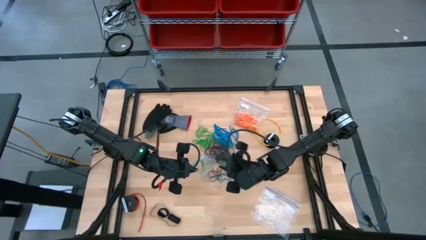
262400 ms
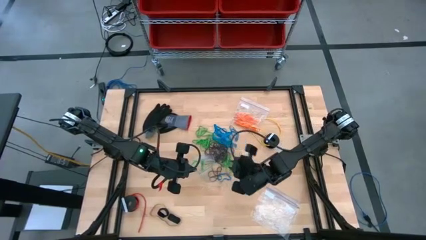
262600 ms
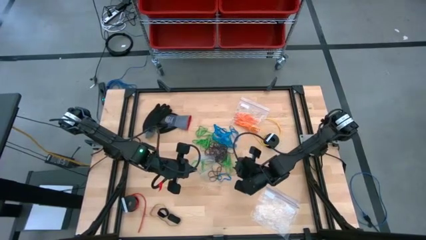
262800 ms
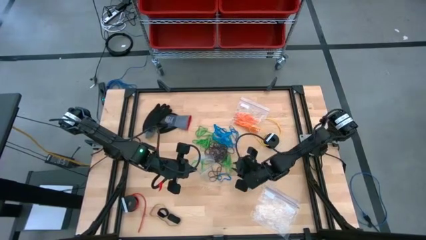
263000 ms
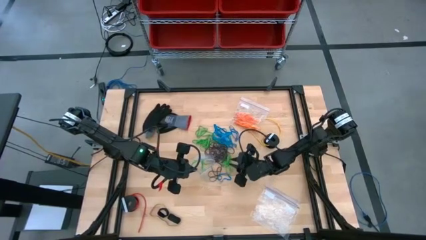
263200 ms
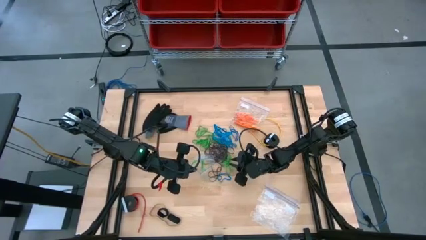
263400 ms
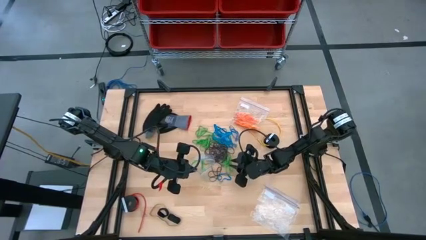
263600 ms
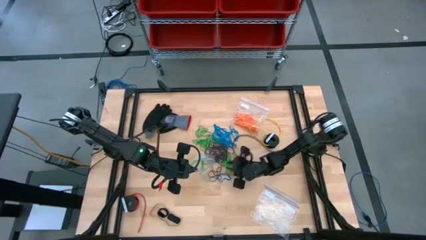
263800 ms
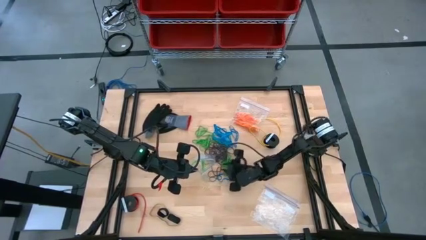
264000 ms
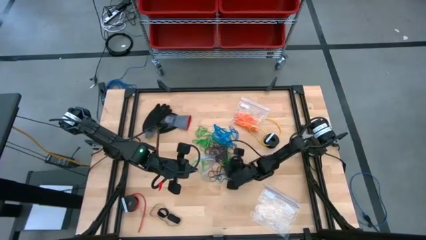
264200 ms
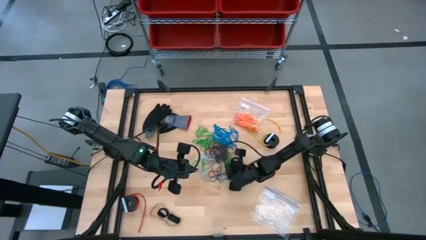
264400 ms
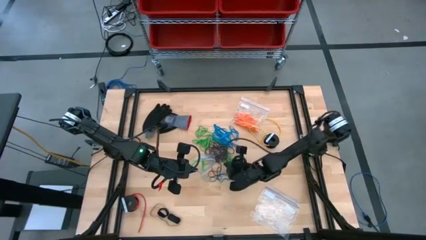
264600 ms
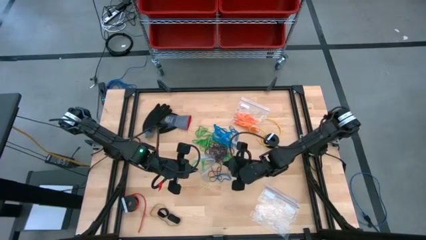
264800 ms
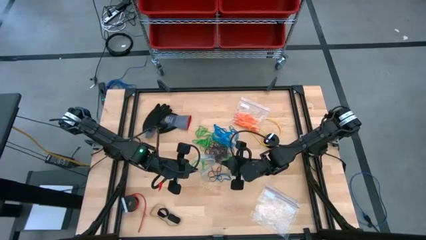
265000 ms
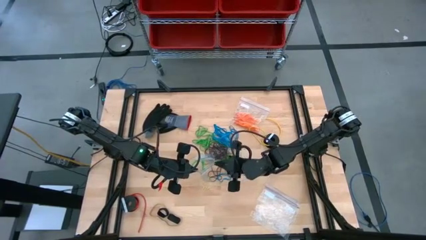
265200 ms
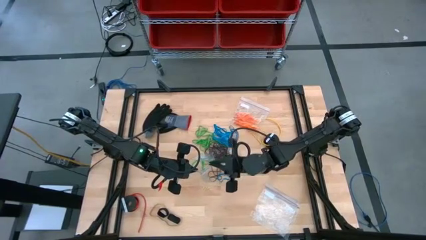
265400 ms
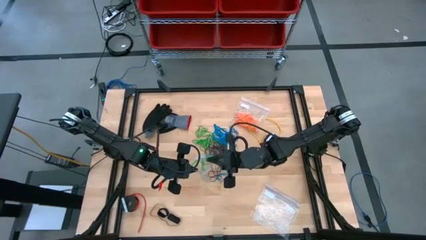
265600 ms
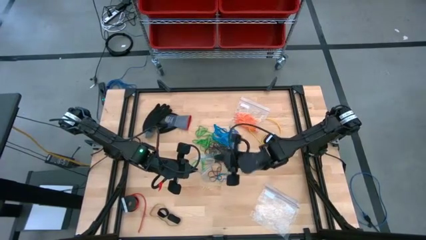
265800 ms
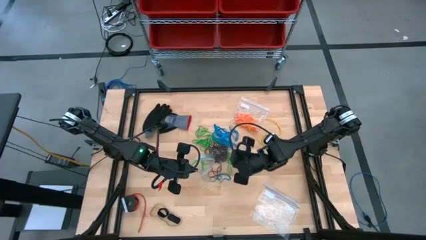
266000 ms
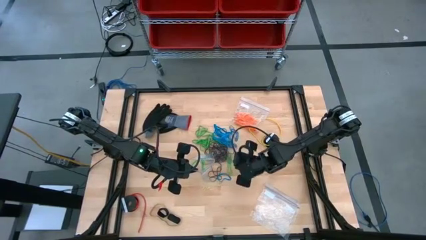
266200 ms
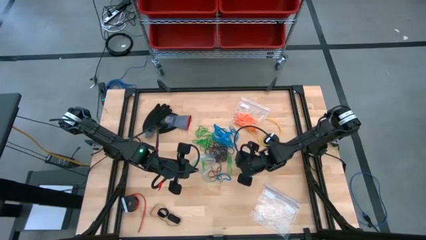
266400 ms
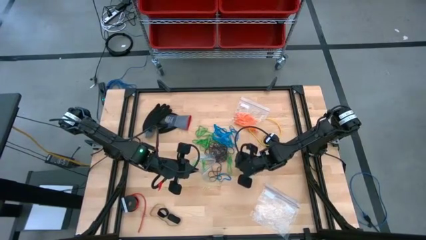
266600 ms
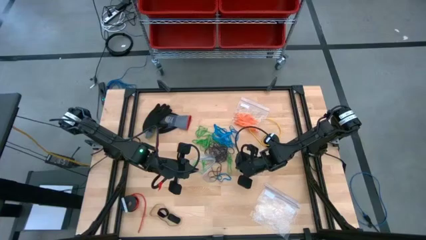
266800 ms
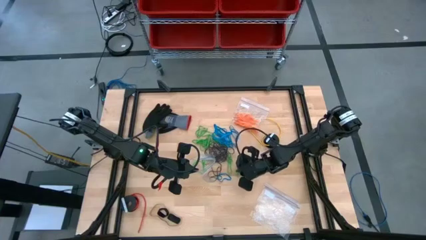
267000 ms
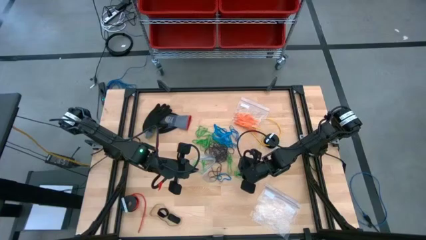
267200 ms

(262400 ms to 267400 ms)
Task: Sort rubber bands
Put the green rubber band into the transparent zip bag

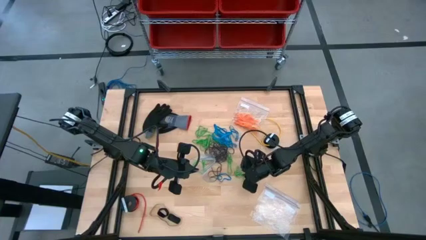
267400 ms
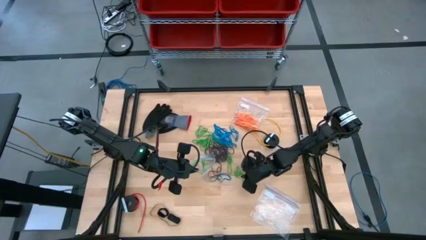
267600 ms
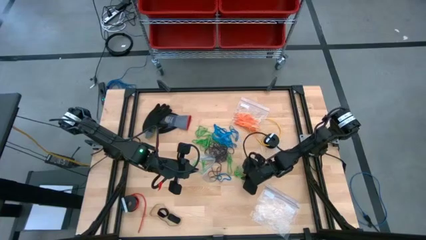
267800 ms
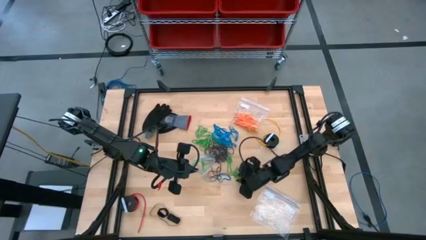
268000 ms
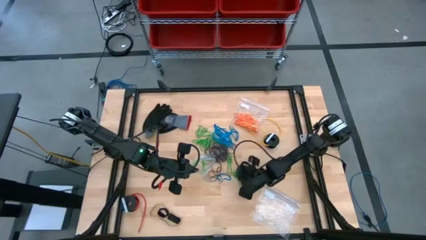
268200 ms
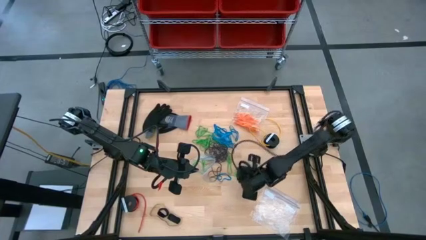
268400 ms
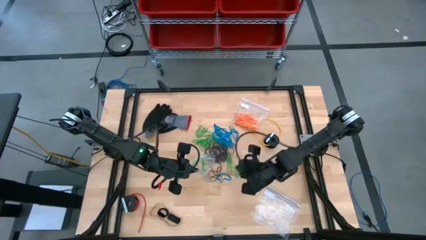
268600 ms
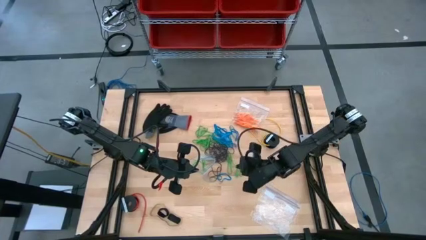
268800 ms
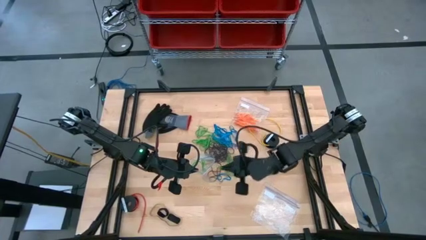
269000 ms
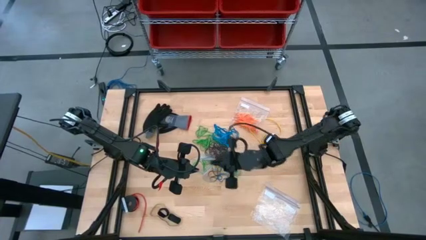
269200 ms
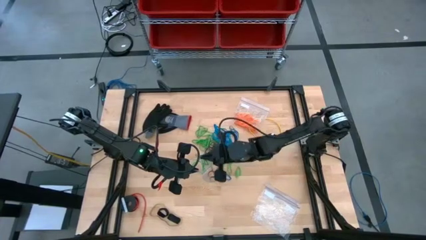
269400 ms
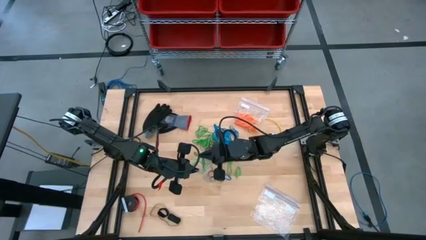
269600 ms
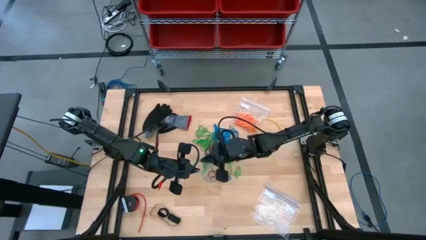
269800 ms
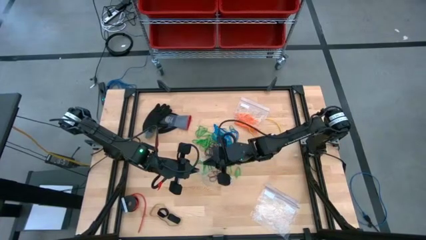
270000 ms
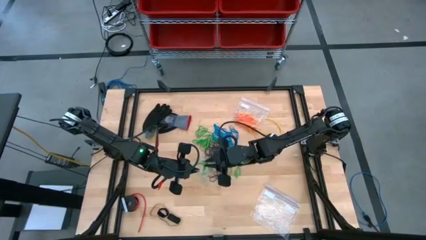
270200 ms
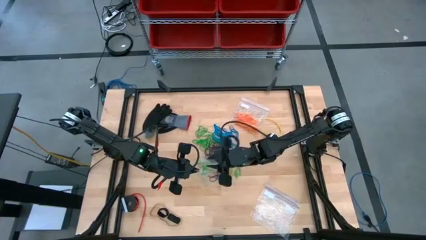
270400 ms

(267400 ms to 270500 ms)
Put the green rubber band into the transparent zip bag

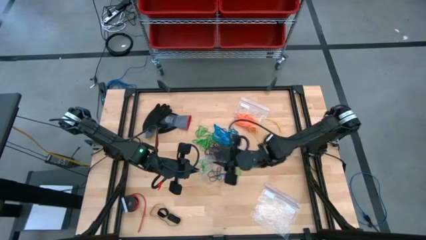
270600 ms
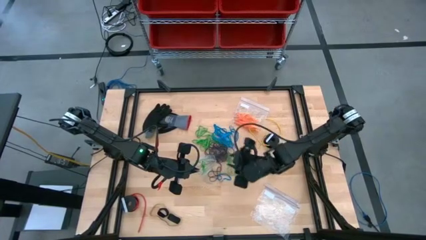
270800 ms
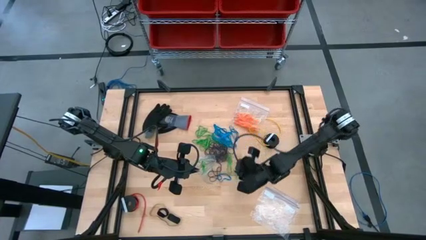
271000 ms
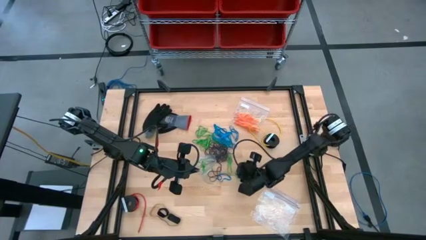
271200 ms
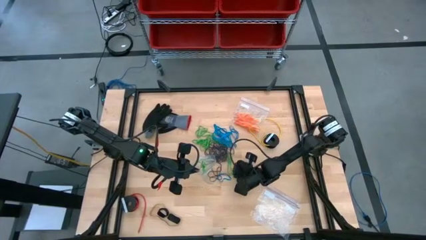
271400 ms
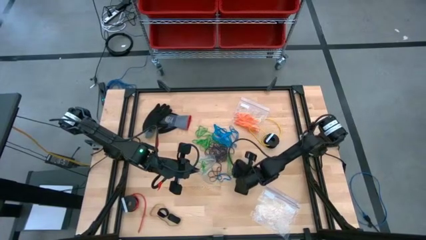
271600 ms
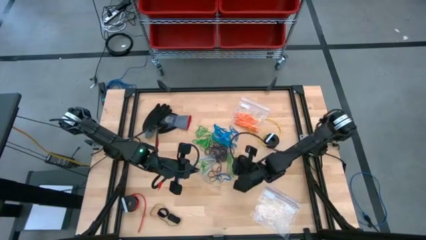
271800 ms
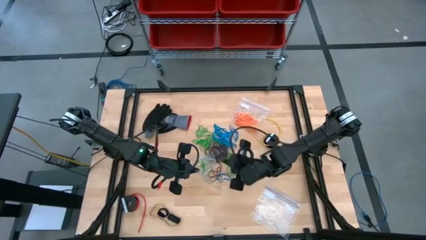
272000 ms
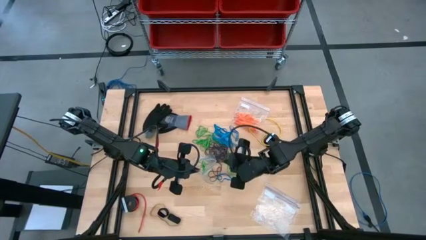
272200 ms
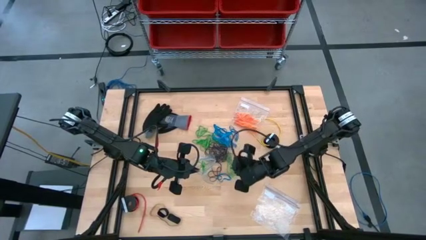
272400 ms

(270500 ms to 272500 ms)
Put the green rubber band into the transparent zip bag

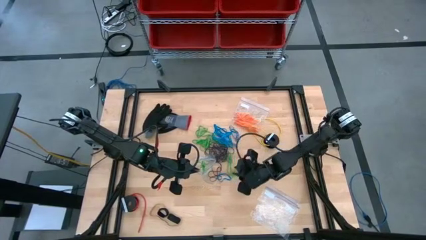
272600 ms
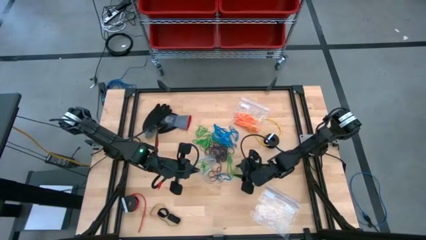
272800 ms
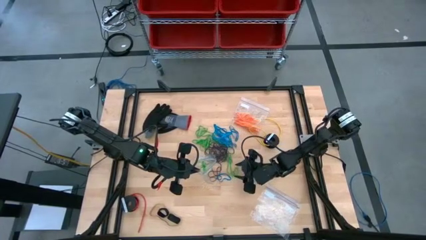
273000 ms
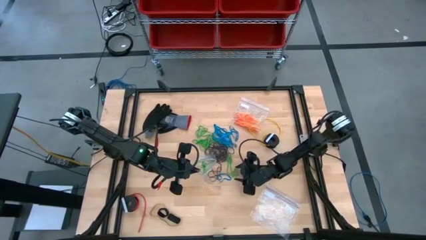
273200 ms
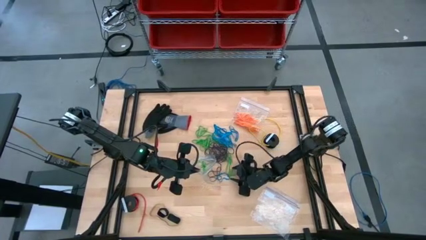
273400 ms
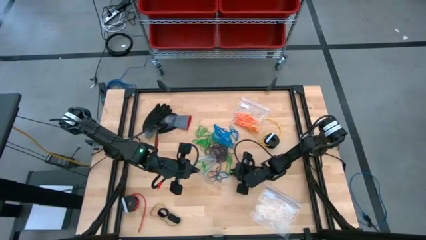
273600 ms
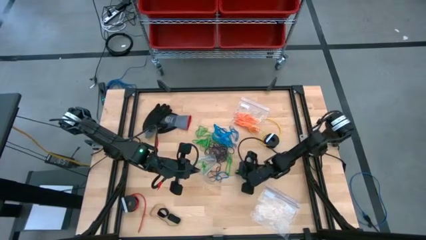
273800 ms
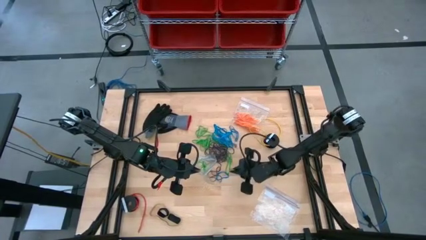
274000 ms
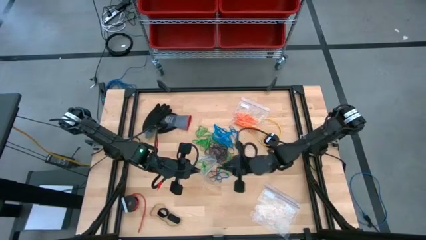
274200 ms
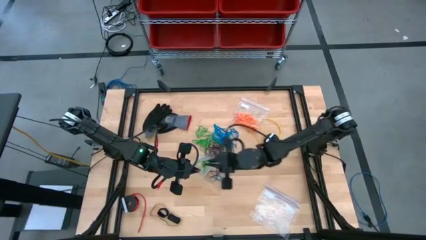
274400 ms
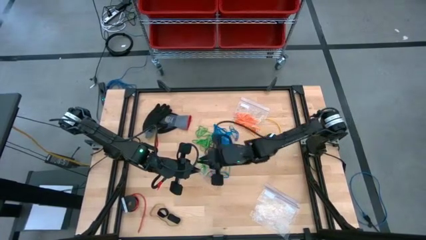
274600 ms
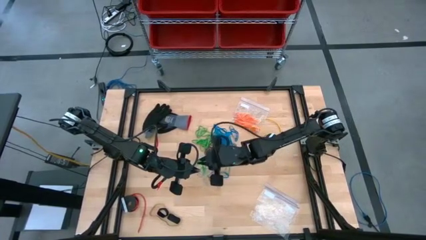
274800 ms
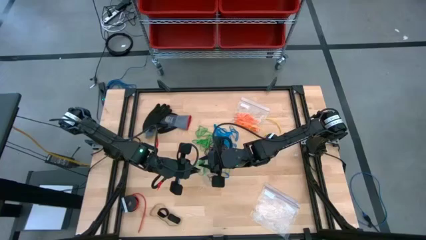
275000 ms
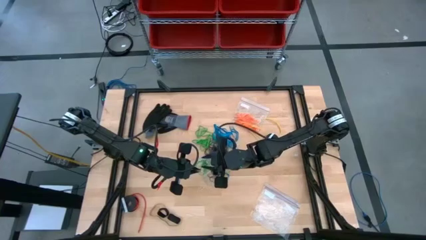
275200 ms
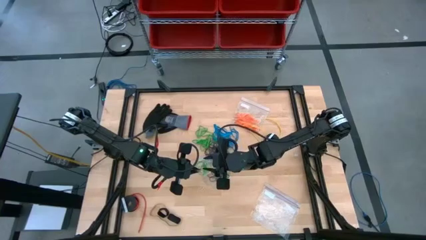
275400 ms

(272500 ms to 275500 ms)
Put the green rubber band into the transparent zip bag

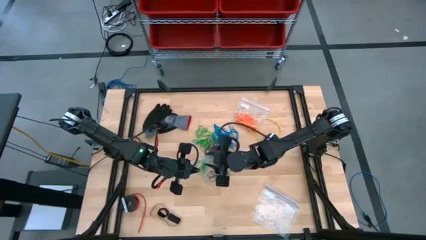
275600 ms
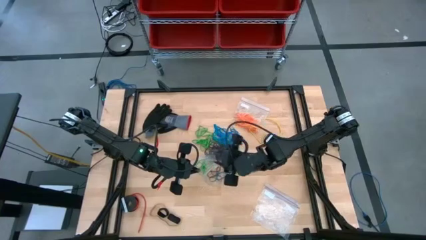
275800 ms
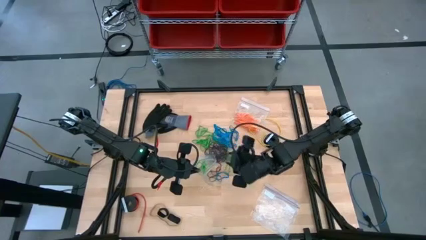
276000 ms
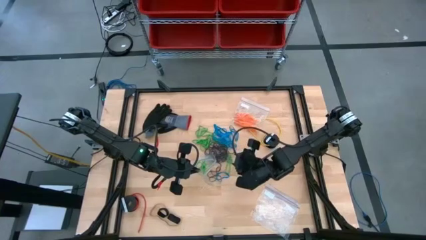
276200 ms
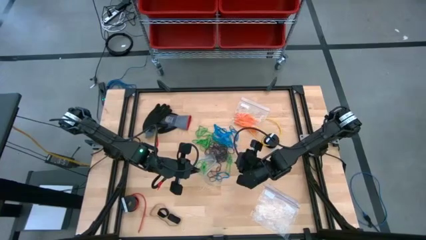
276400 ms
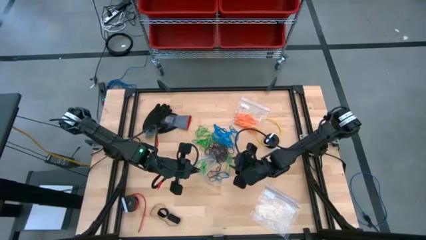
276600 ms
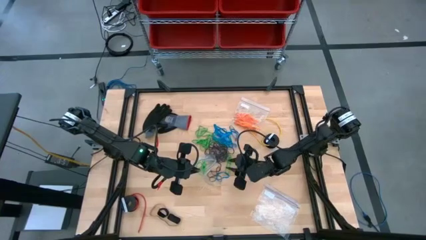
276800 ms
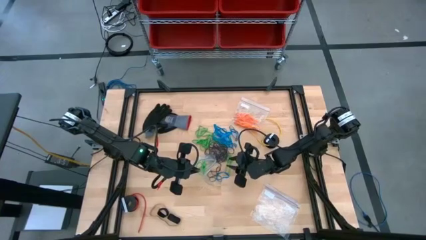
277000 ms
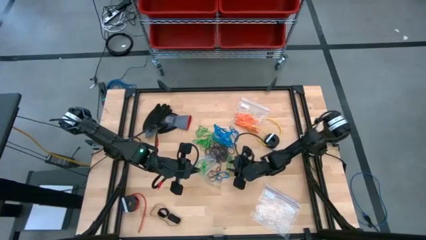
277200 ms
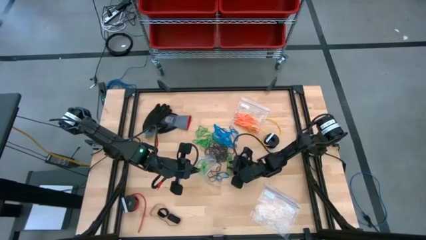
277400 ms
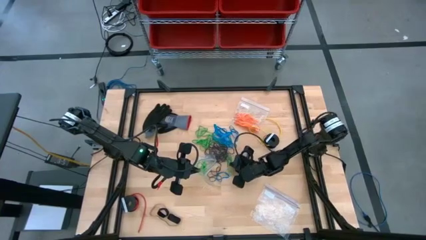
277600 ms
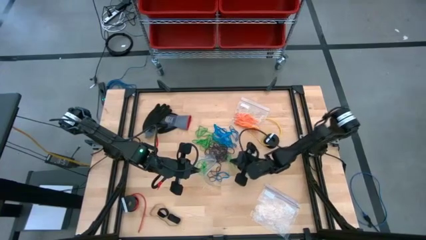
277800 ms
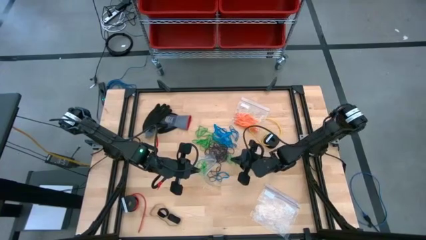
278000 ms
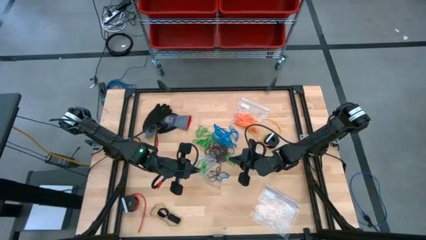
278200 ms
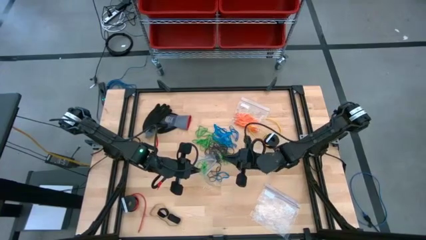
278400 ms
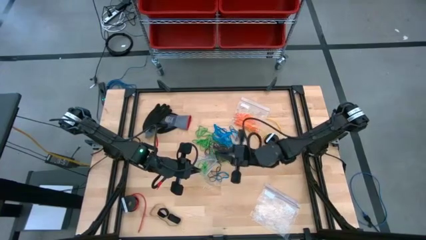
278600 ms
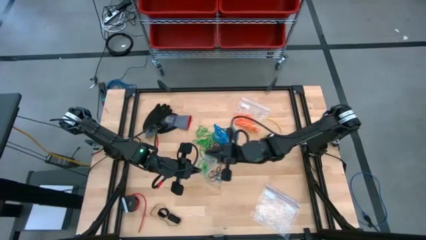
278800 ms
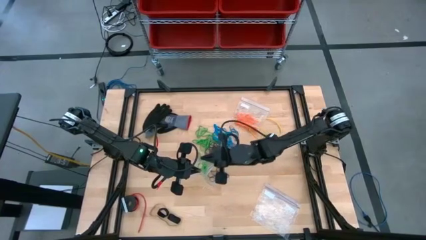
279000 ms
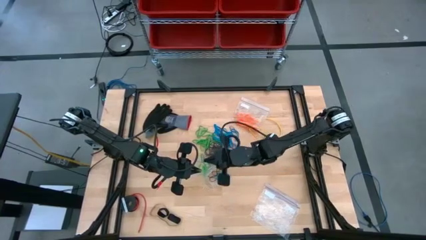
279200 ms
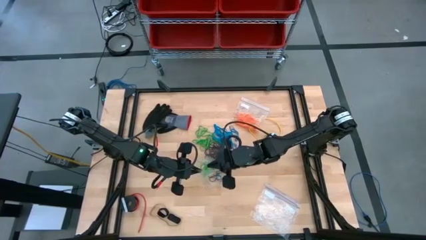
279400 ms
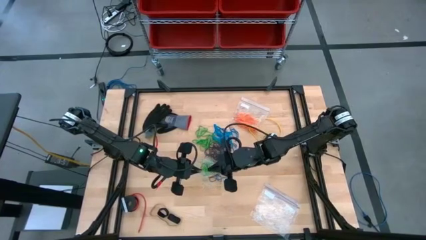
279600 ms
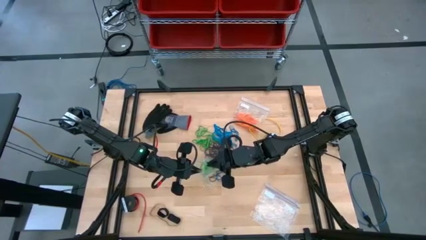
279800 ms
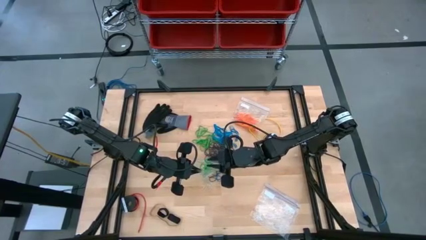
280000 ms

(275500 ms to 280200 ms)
Put the green rubber band into the transparent zip bag
